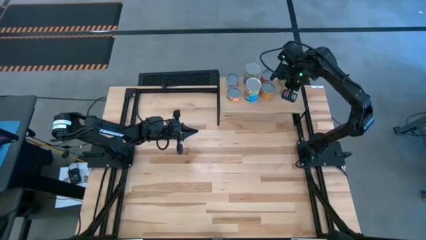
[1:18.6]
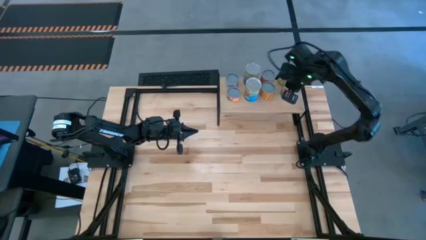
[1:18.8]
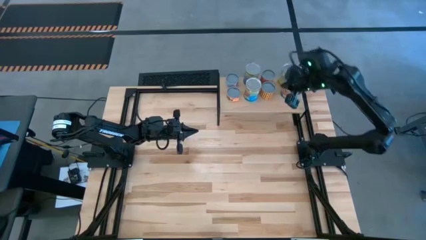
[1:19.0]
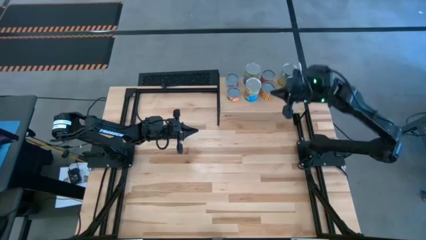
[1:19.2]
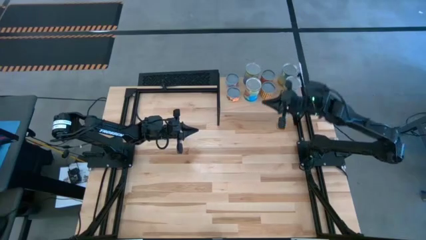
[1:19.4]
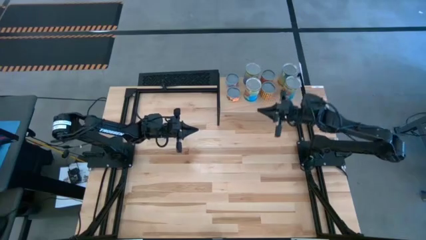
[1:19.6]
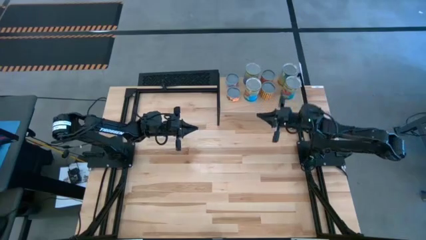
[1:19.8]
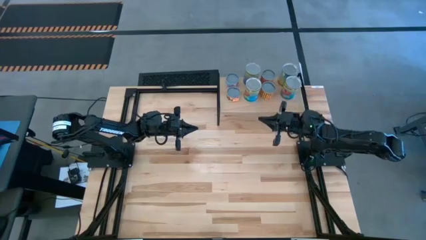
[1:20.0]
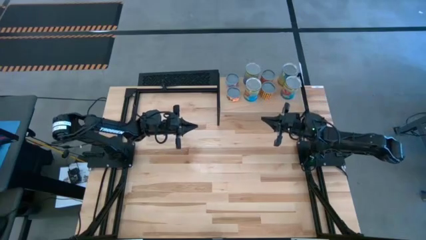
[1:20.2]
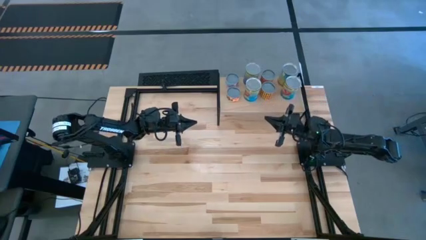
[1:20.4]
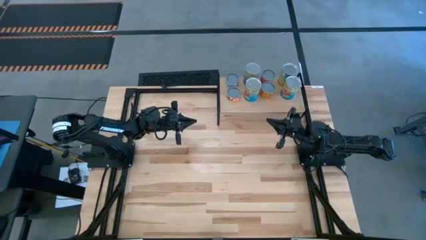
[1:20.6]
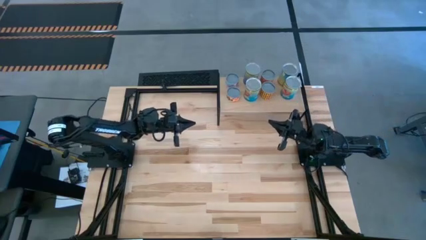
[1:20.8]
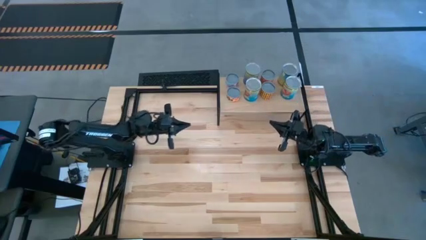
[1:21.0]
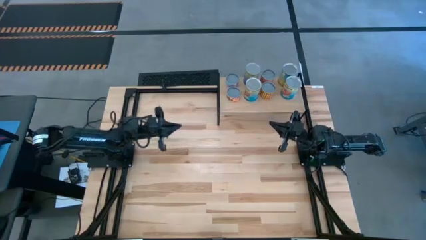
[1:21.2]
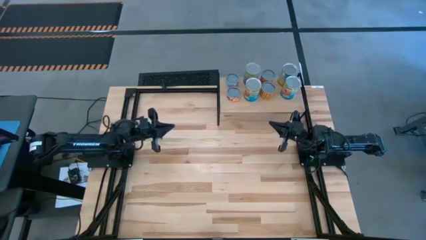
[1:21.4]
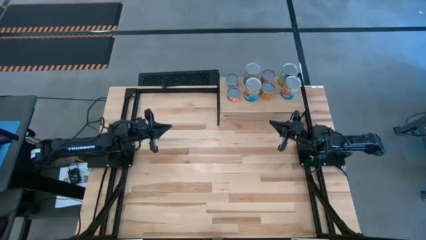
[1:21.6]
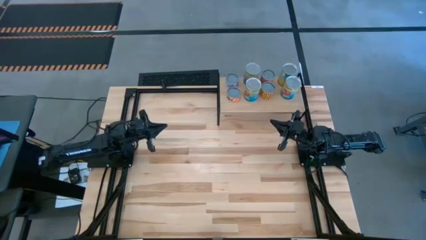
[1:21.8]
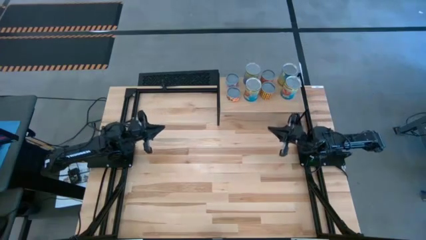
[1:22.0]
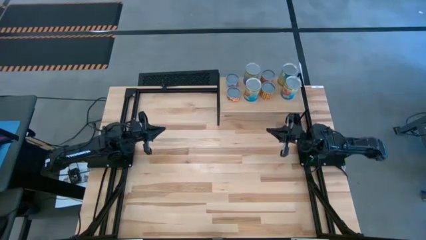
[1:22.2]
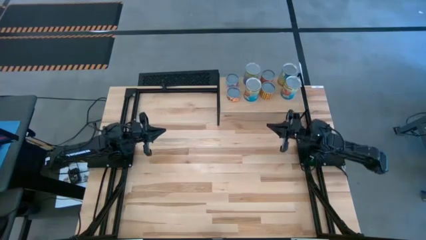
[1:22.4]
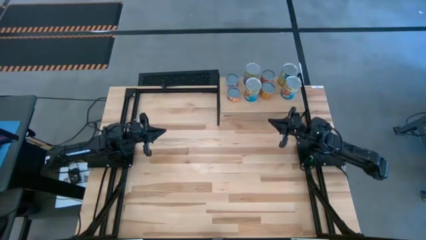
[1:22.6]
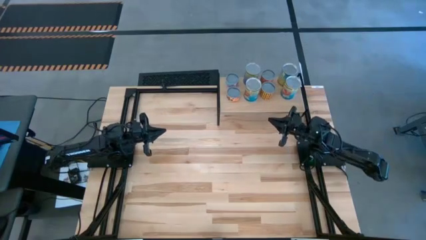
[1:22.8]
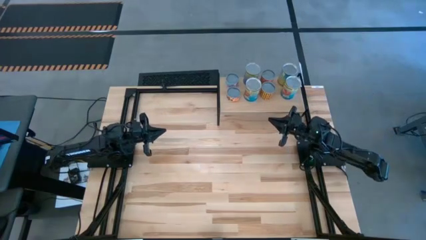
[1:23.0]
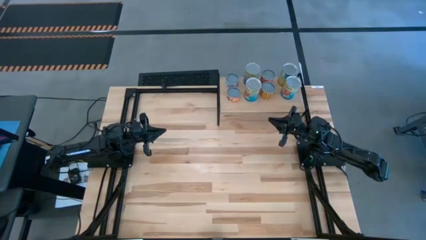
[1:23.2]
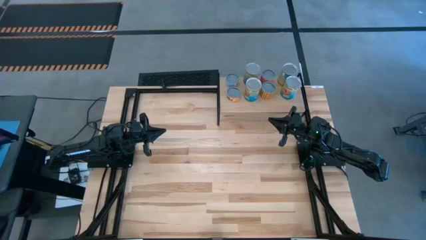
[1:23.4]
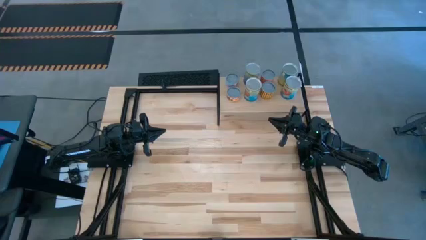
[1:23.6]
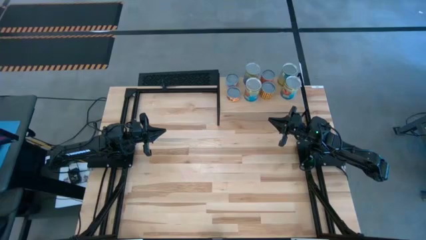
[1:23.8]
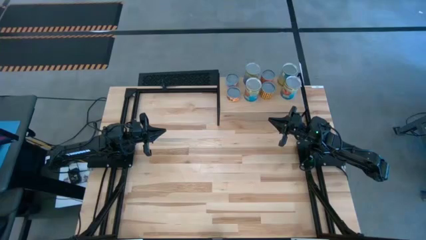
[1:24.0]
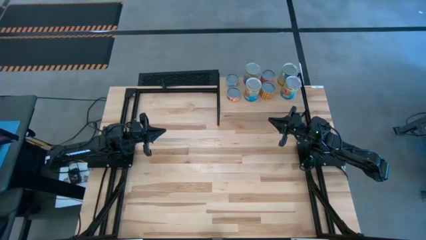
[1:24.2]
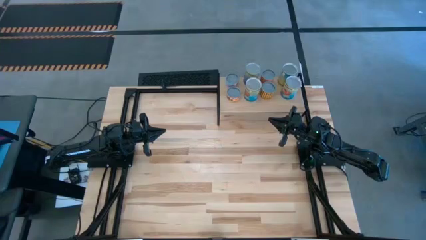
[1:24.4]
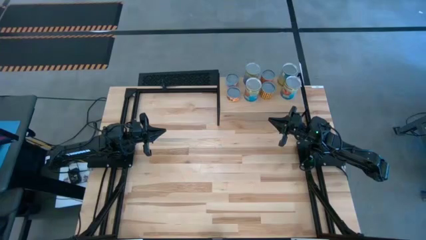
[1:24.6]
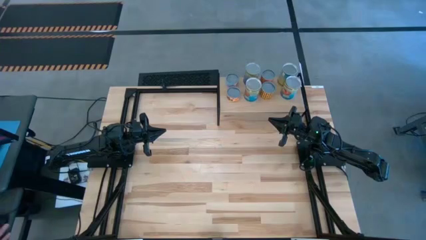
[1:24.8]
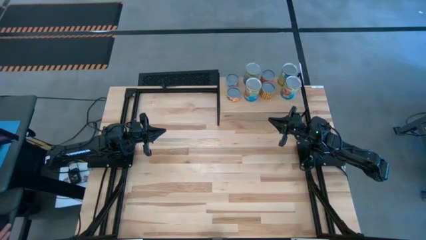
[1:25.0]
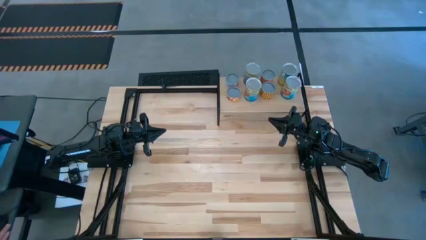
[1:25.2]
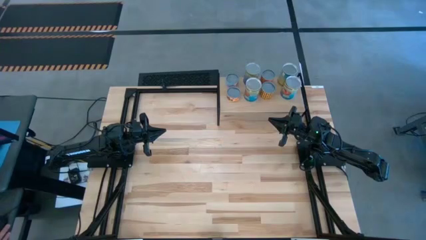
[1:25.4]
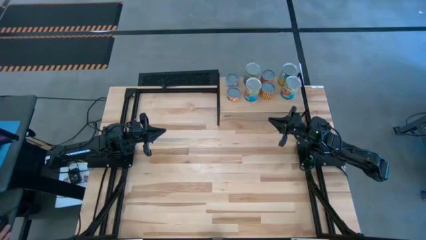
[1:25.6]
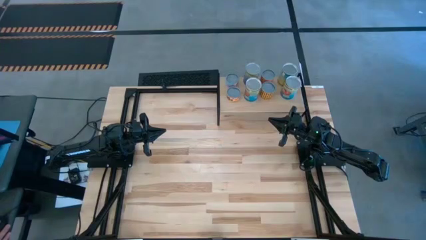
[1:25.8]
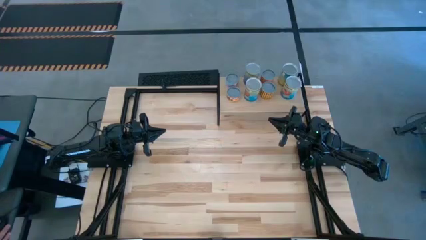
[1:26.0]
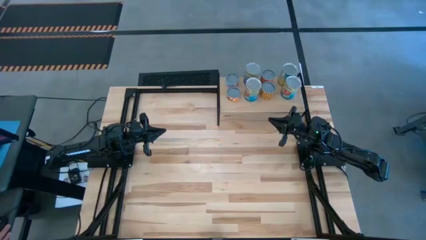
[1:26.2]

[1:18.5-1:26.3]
Task: Pick and place cans onto a shelf
Return to Home Position

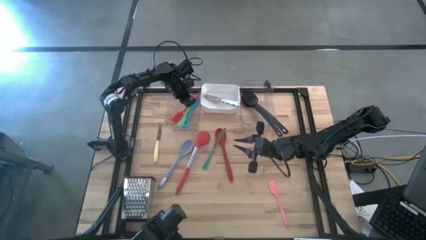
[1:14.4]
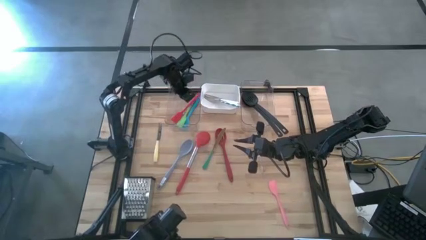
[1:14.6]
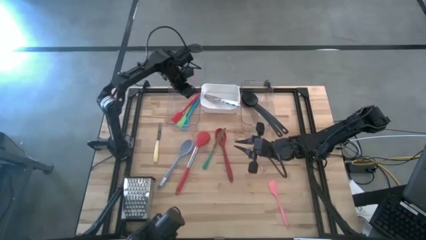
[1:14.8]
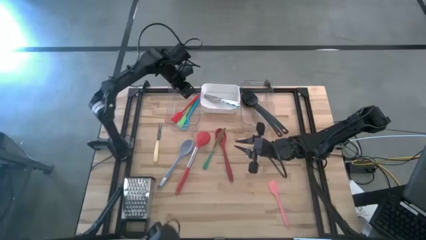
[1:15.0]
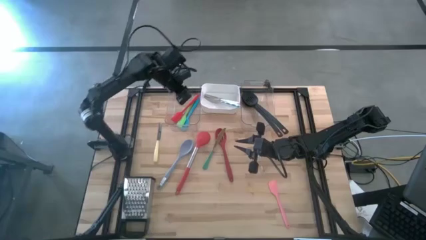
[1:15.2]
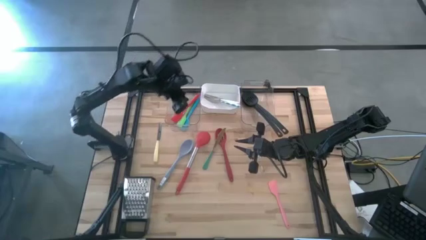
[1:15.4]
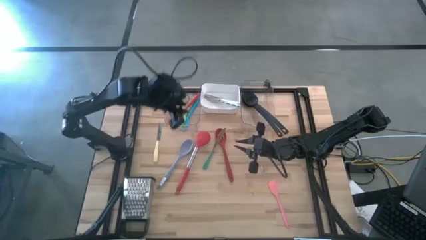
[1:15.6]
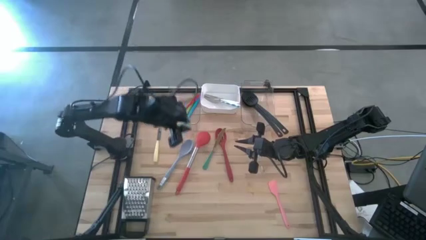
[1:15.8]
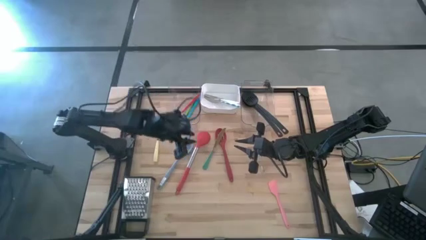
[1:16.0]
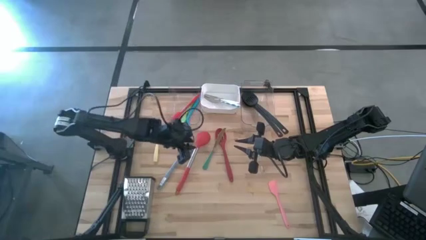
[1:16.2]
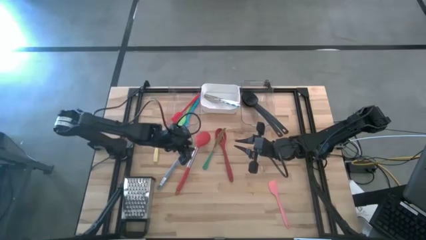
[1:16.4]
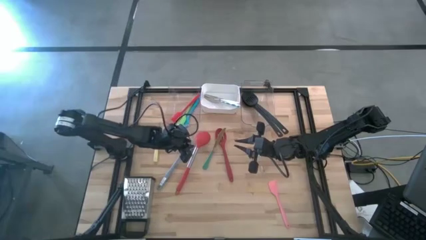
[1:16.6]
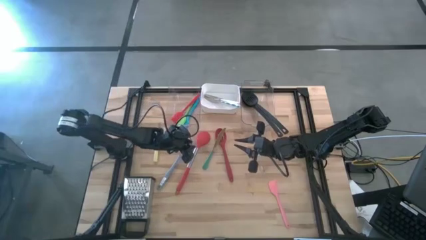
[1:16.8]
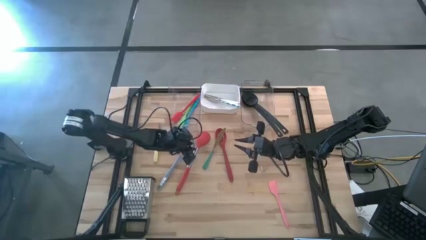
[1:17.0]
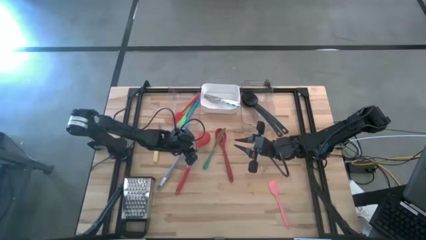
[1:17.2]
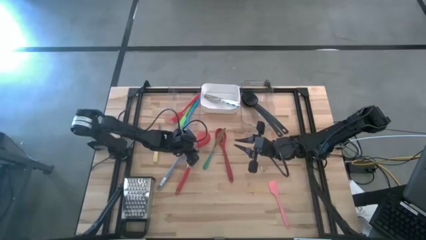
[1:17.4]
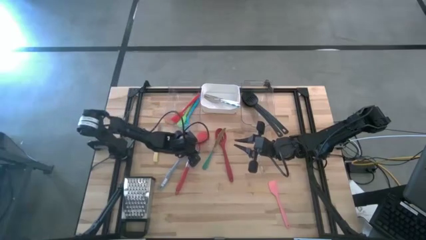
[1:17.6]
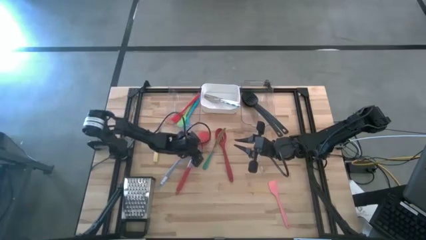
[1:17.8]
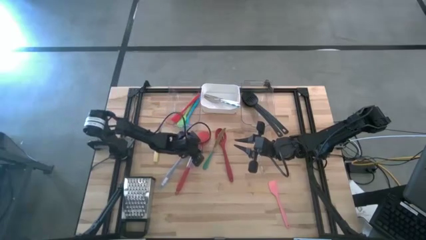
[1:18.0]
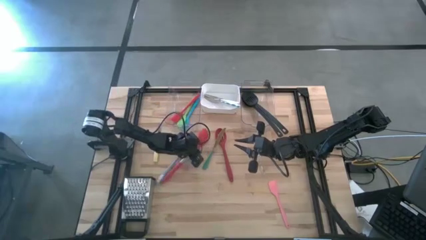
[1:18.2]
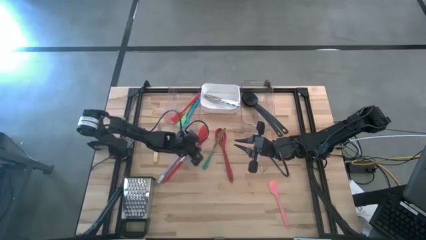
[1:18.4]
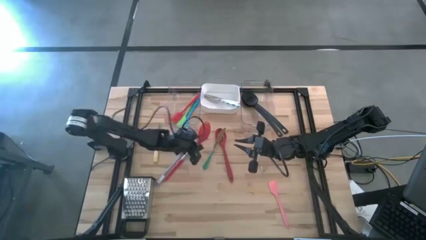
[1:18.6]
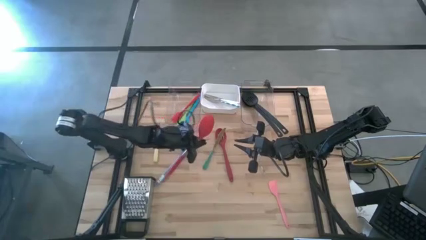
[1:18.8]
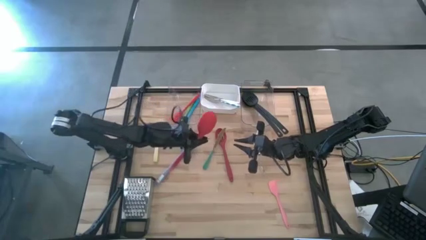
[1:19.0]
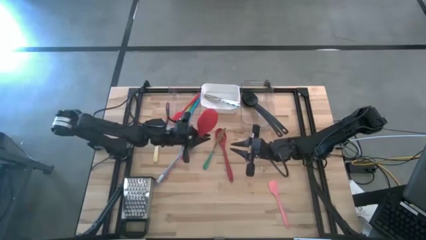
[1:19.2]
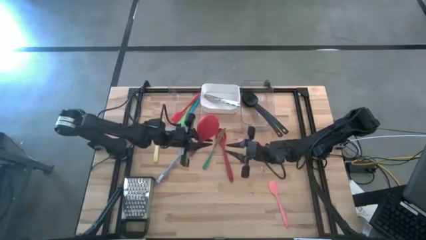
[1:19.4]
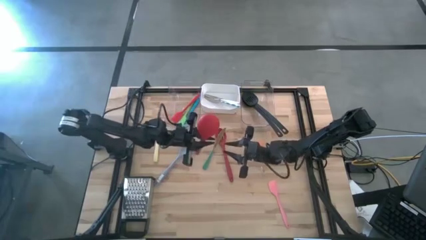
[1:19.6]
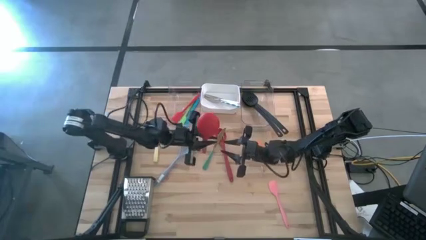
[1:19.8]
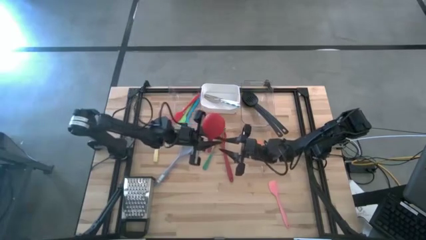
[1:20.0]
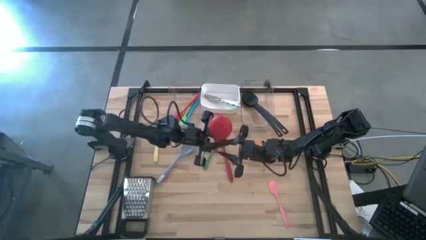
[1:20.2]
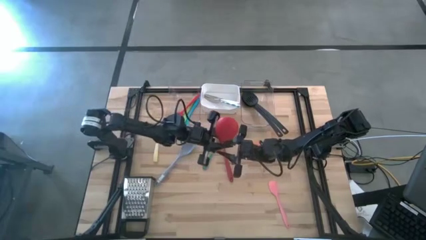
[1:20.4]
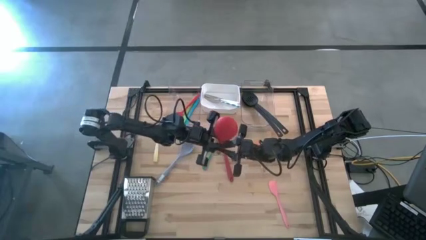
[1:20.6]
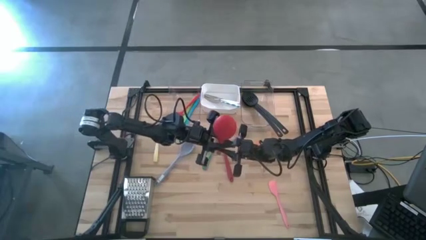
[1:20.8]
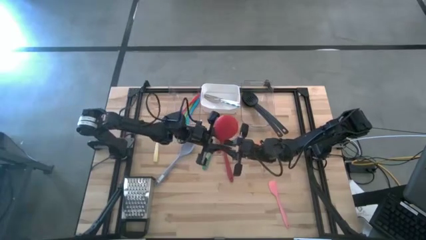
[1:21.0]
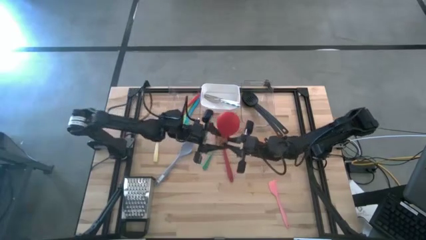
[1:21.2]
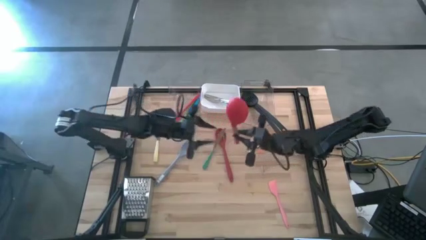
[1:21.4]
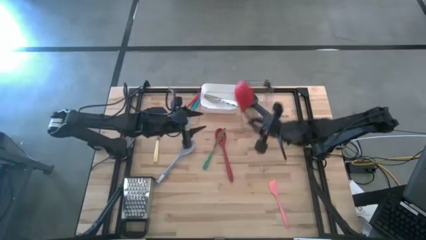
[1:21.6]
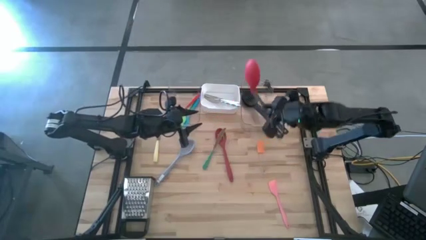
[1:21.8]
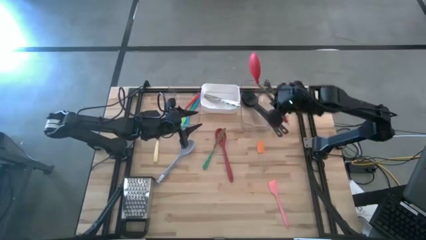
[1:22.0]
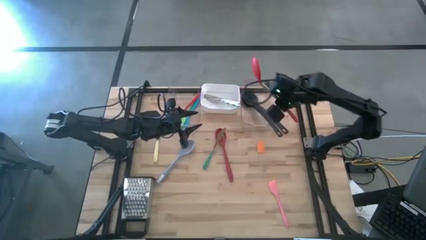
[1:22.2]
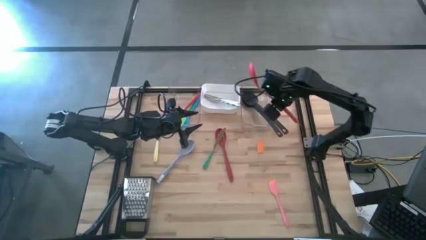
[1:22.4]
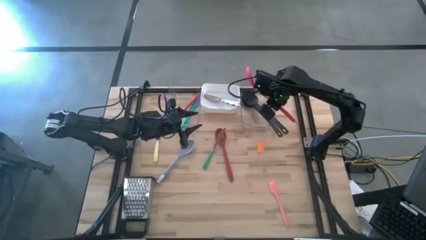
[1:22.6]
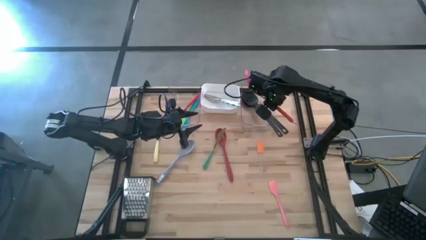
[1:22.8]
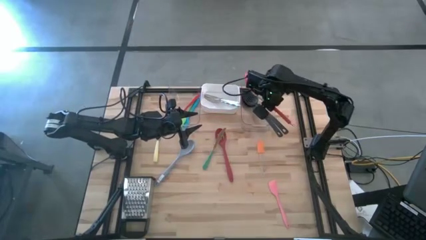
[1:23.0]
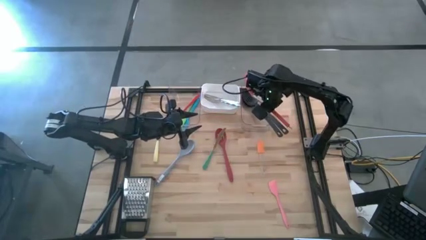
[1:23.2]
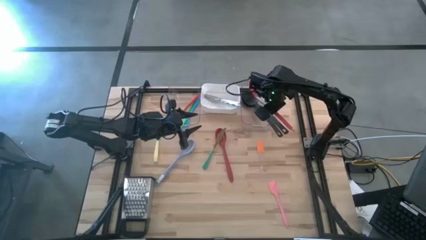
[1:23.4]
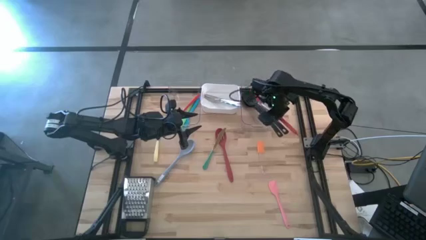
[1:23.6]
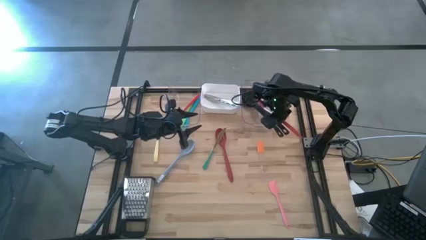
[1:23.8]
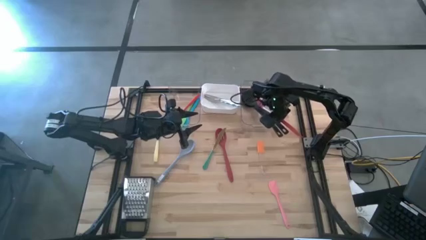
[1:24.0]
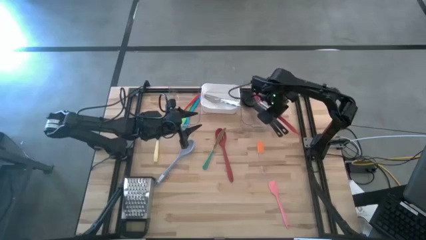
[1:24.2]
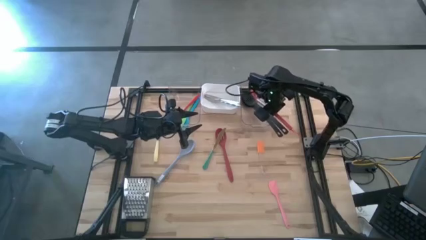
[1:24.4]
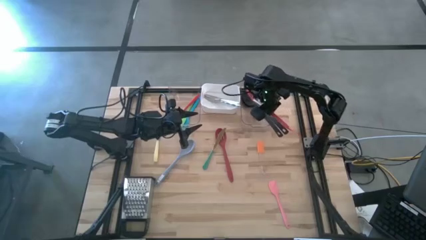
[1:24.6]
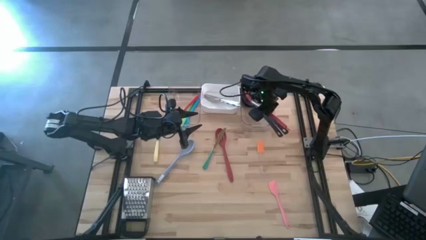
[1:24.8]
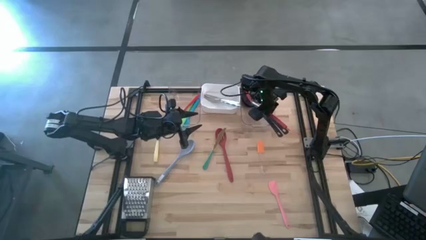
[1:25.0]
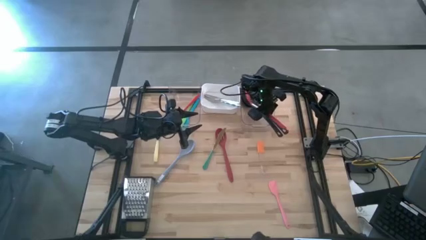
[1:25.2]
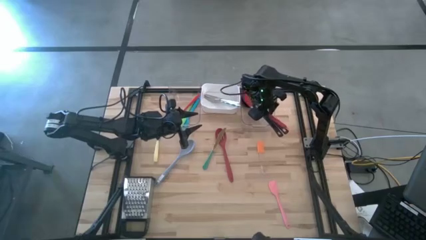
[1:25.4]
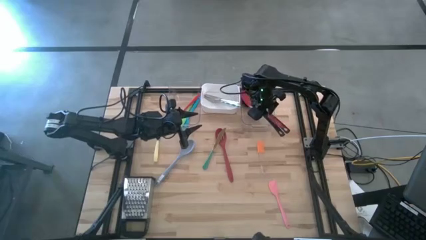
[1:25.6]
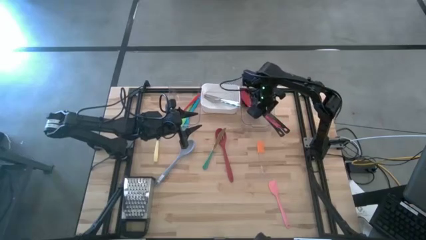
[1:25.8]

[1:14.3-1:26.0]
Task: Pick & Place Kitchen Items
Put the left red serving spoon into the right transparent bin
